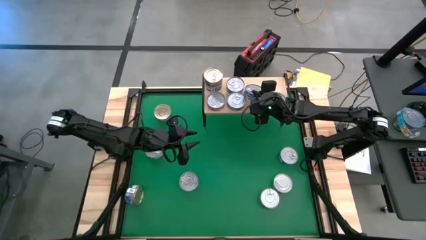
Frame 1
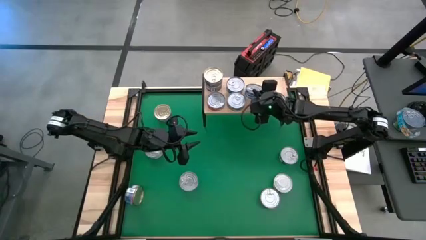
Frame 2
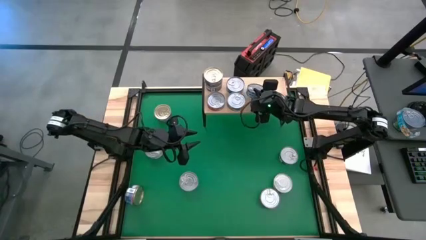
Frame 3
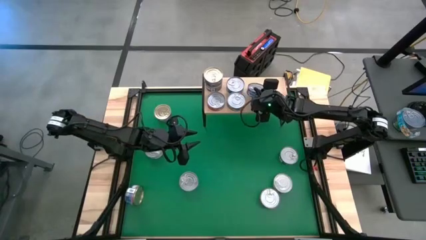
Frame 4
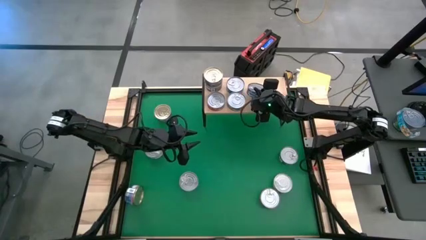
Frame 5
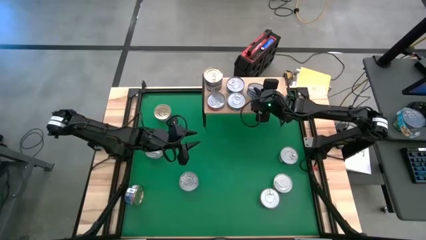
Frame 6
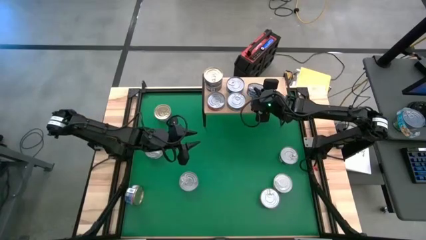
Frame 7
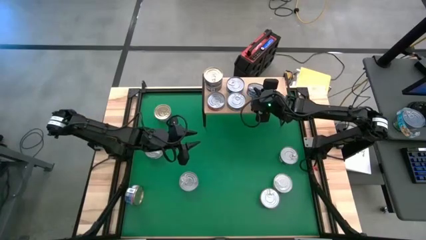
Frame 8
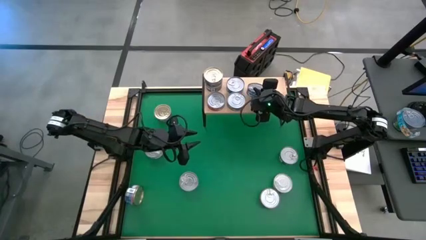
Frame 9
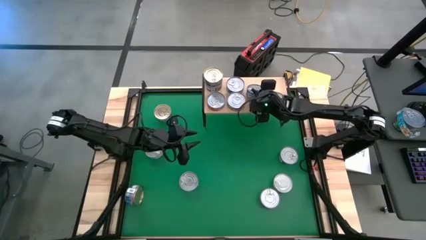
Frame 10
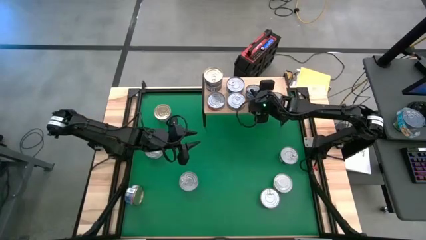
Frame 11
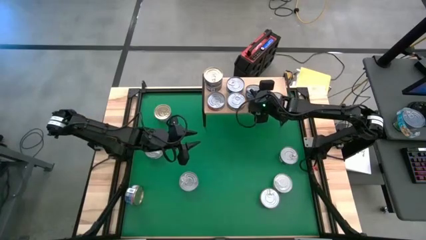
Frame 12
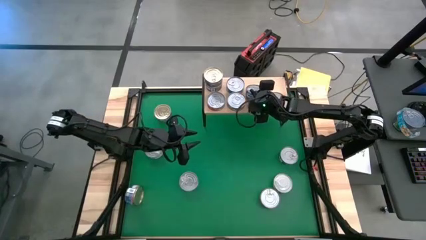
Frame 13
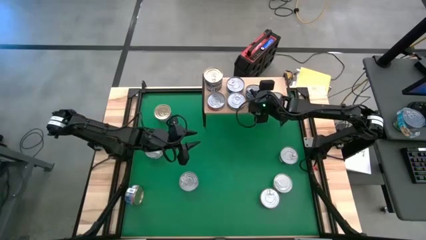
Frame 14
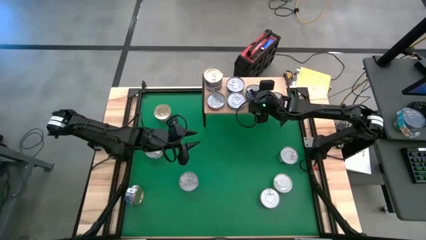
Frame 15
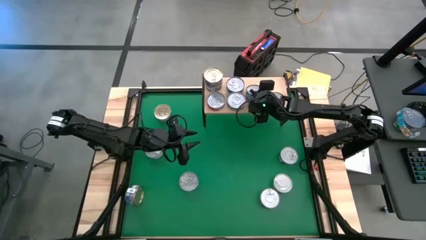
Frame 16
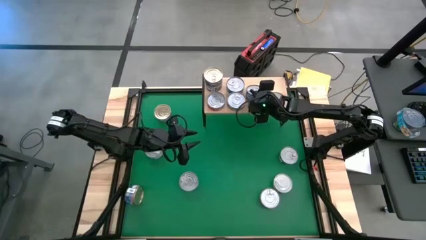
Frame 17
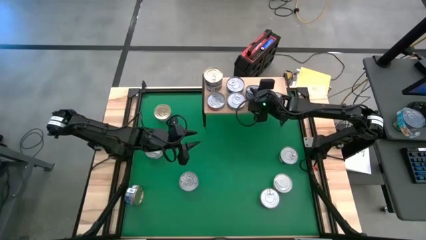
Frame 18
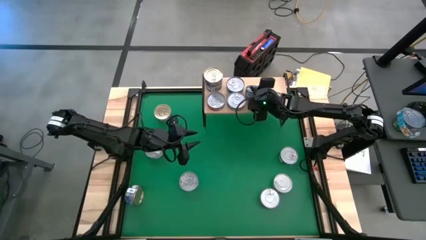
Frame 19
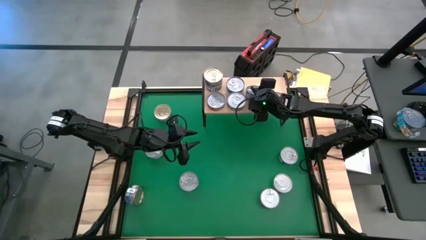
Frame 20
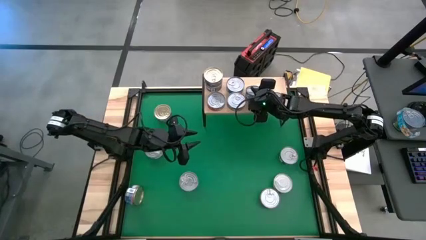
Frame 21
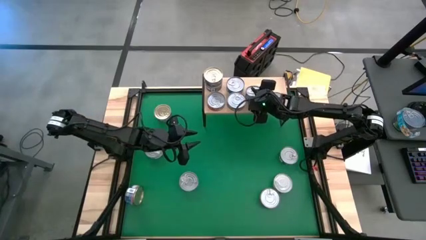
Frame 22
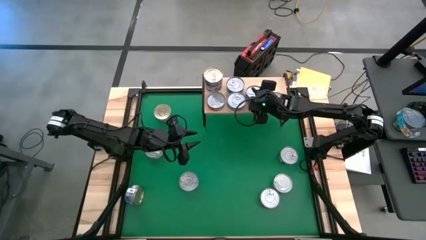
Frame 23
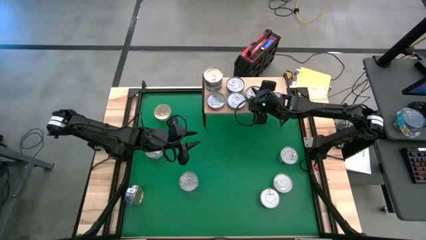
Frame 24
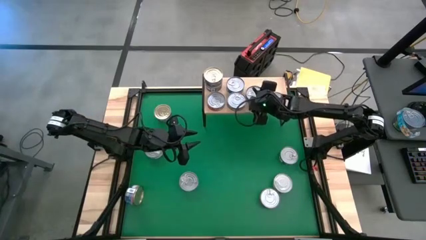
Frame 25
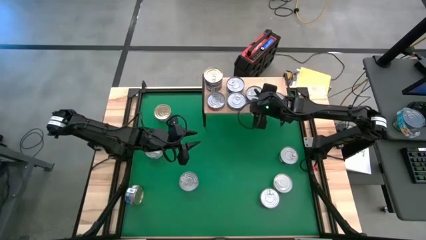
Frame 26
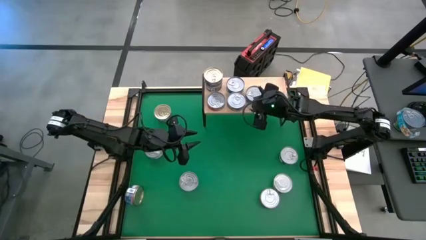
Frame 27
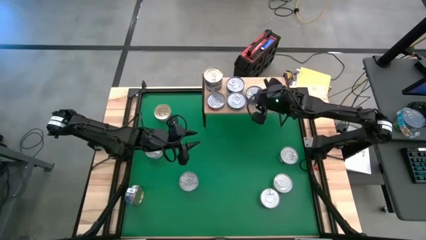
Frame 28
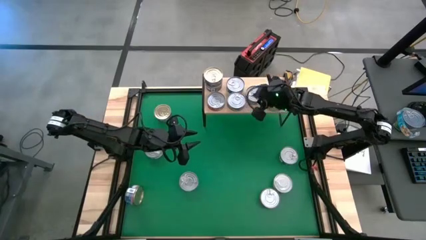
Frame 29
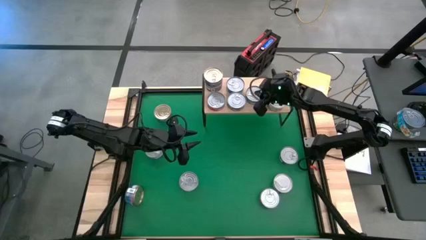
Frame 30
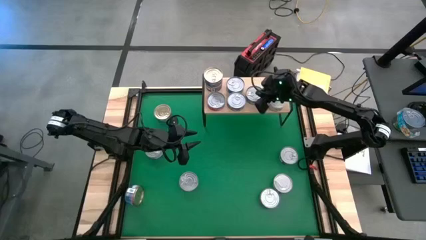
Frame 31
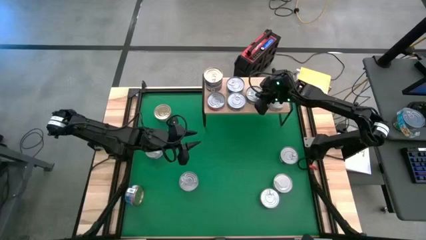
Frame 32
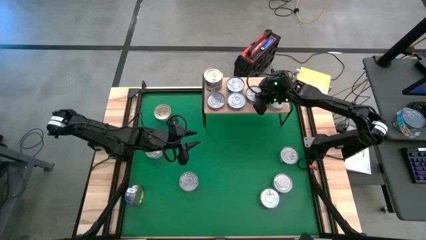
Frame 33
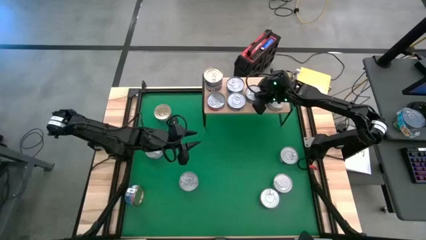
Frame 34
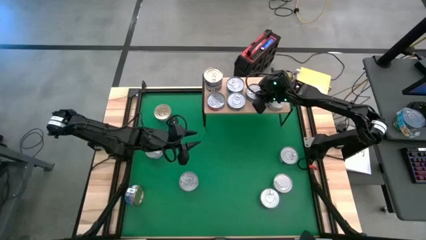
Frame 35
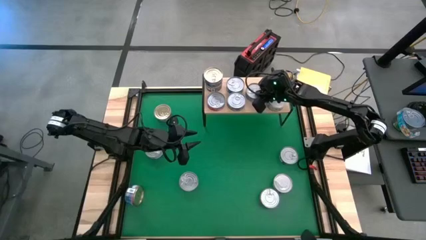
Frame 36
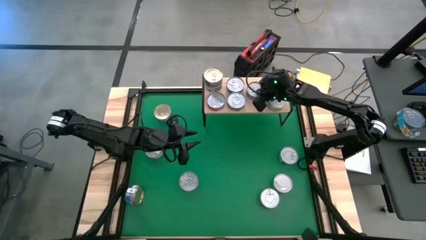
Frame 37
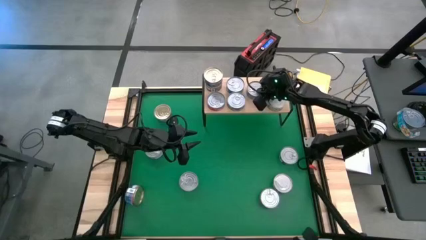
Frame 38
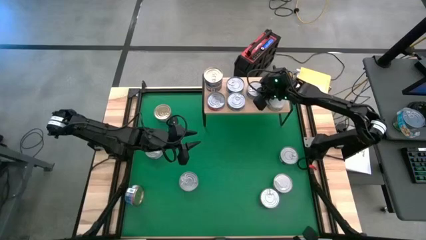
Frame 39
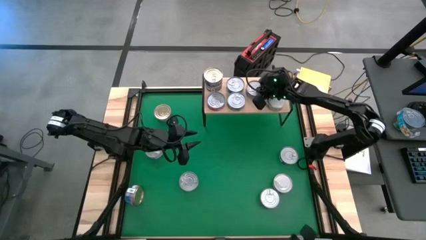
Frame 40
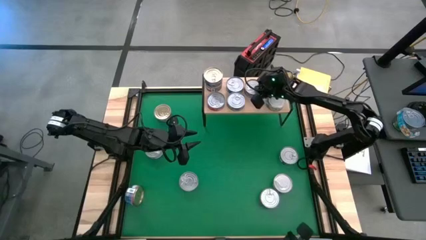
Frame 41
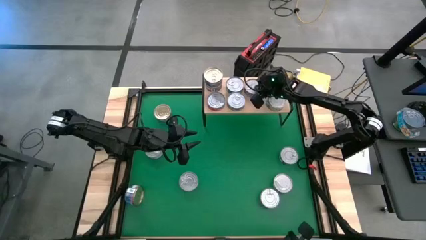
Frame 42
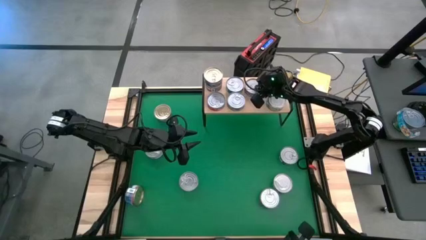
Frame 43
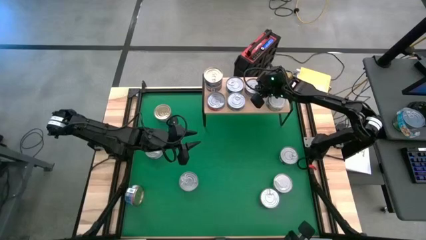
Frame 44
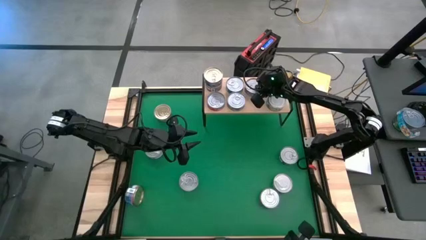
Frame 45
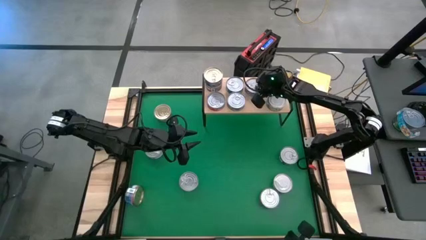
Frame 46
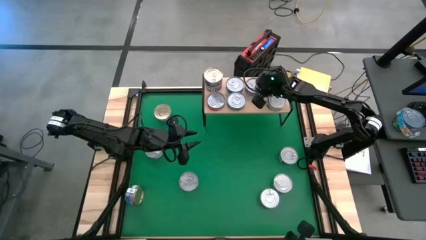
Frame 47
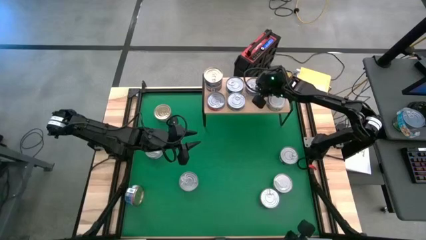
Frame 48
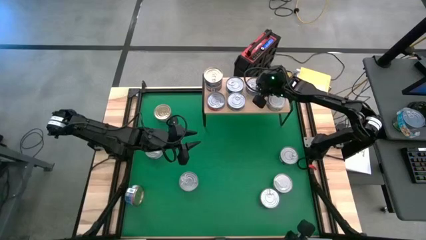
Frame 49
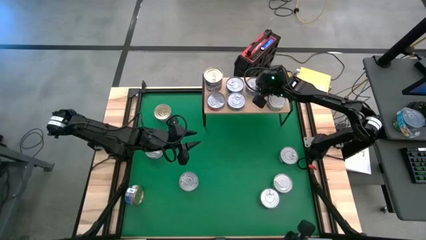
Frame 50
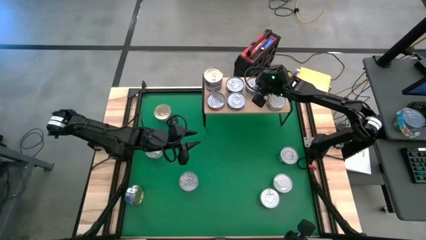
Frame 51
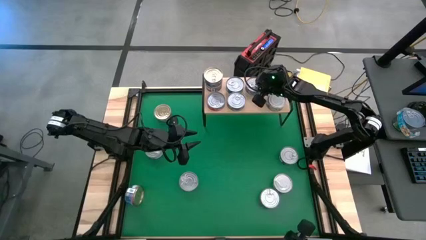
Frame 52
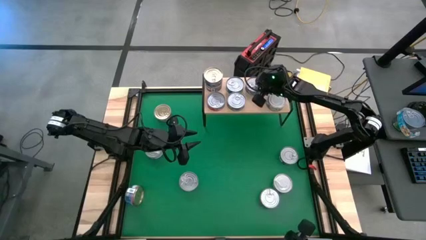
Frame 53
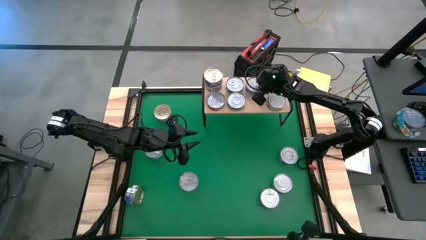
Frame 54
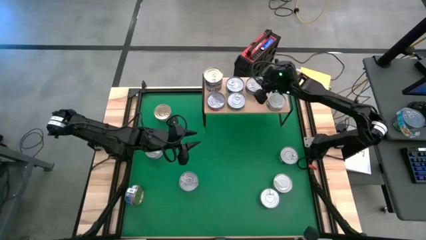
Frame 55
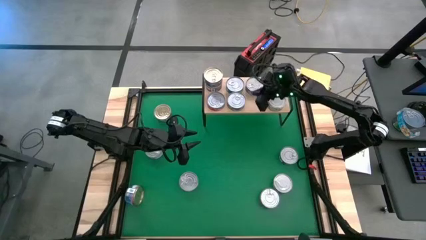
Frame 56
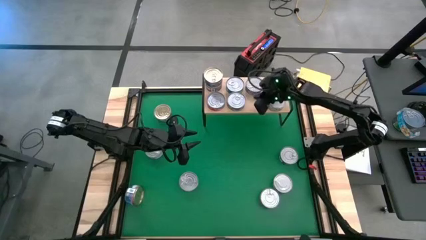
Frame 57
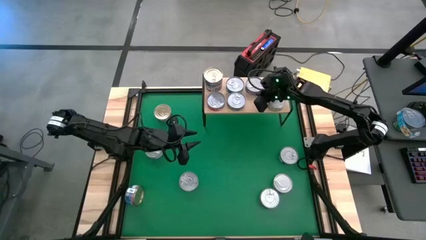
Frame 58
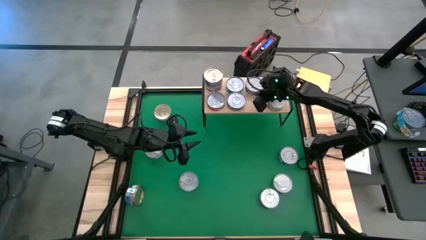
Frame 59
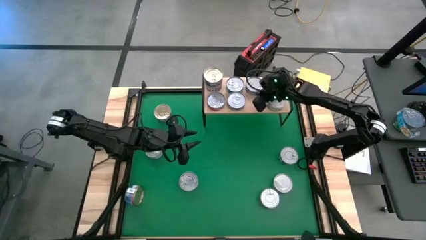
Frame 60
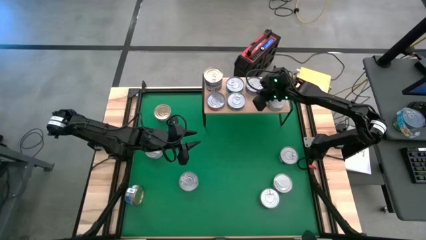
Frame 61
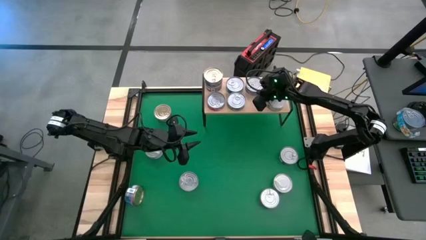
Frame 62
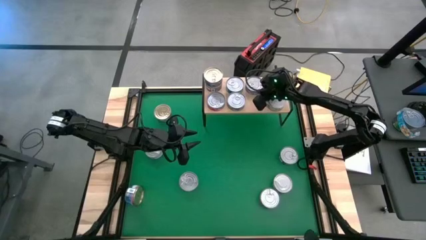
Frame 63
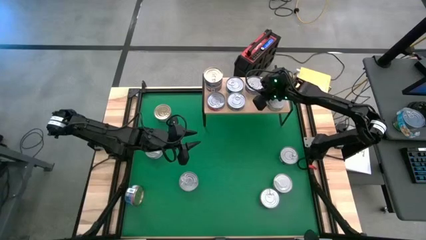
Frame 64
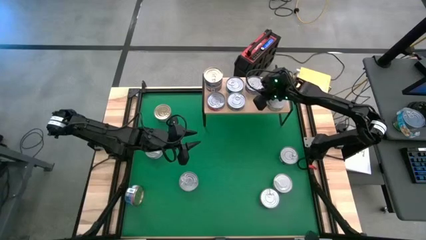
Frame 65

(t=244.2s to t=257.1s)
Task: Stack canned seafood by type on shelf
Put the blue tuna can on the shelf
